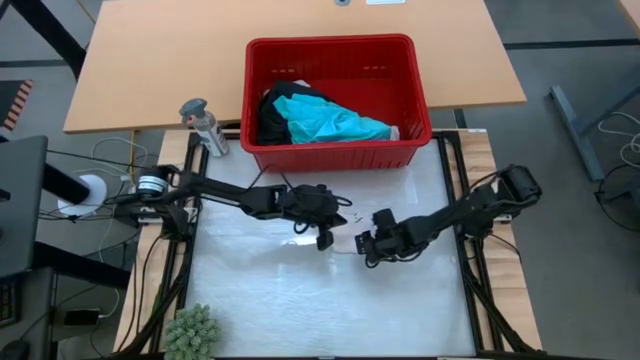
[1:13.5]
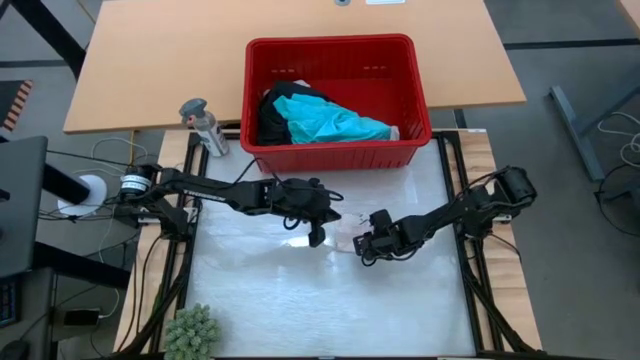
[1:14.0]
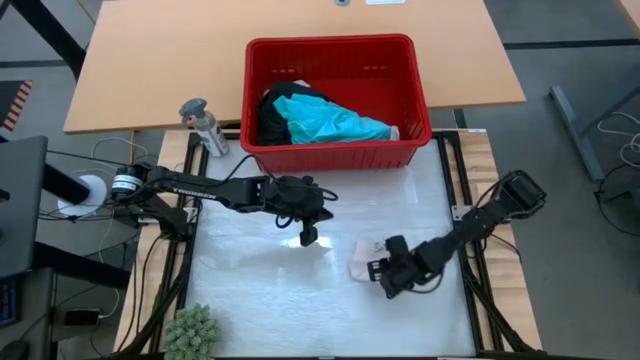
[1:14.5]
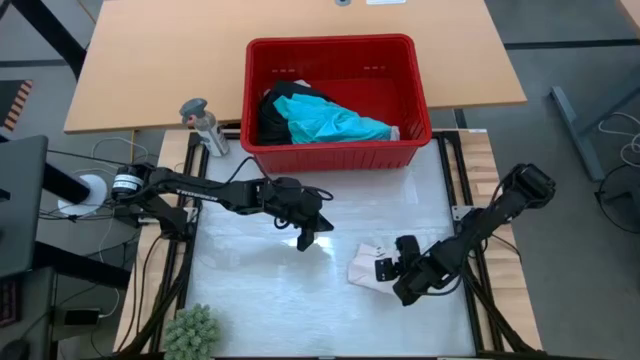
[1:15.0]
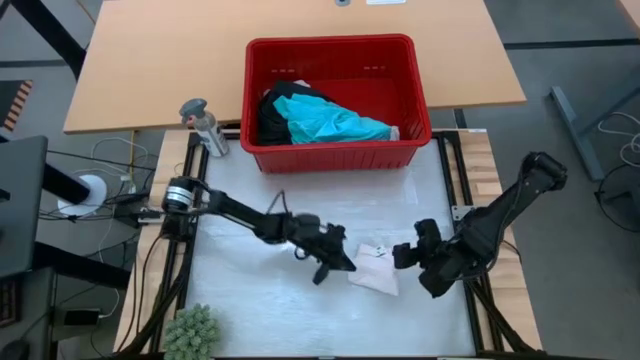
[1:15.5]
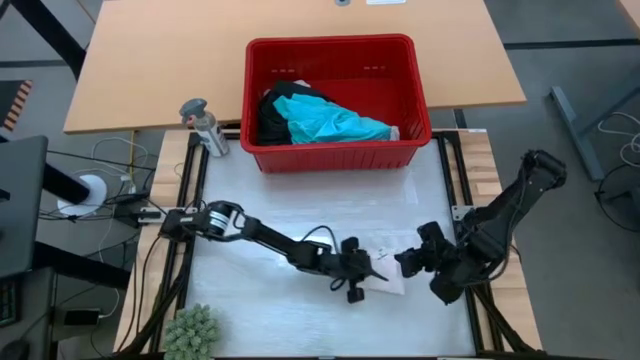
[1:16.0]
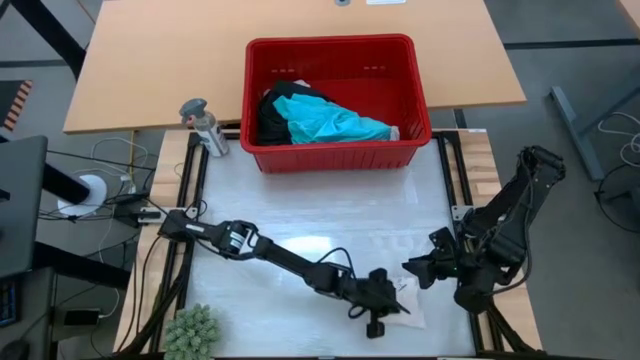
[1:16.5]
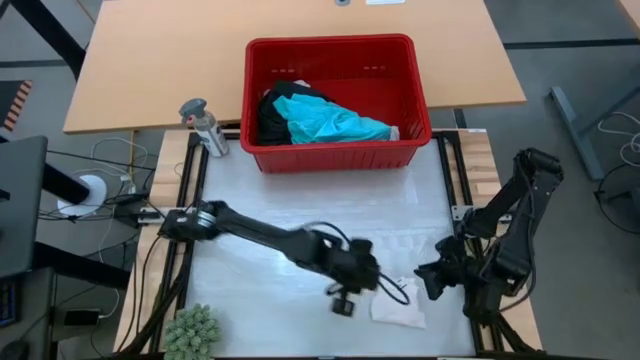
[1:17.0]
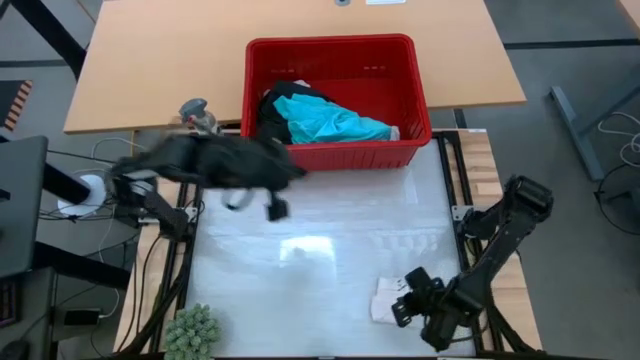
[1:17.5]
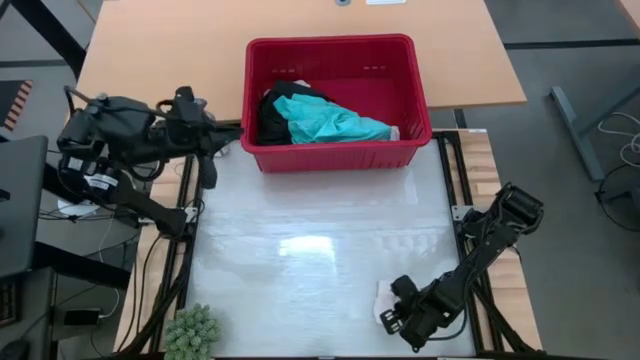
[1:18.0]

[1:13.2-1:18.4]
Task: Fold Laundry from Bin
Move the white underwear to the bottom right of the table
